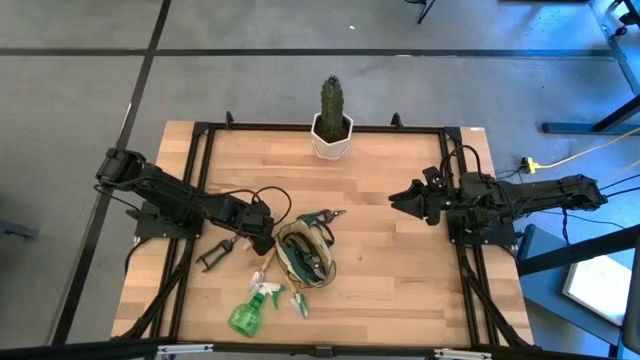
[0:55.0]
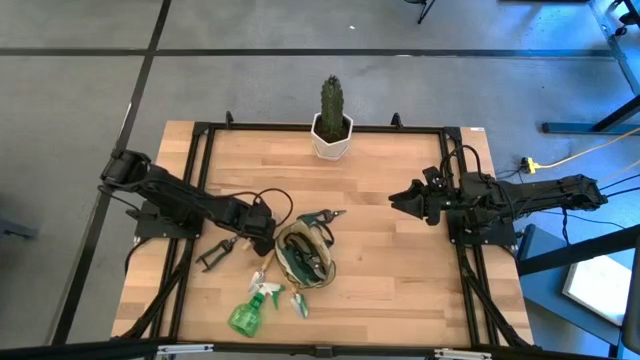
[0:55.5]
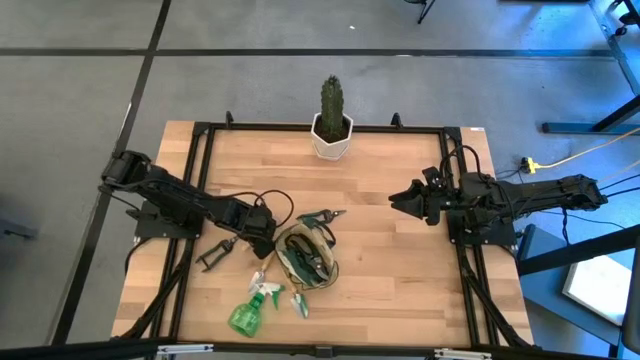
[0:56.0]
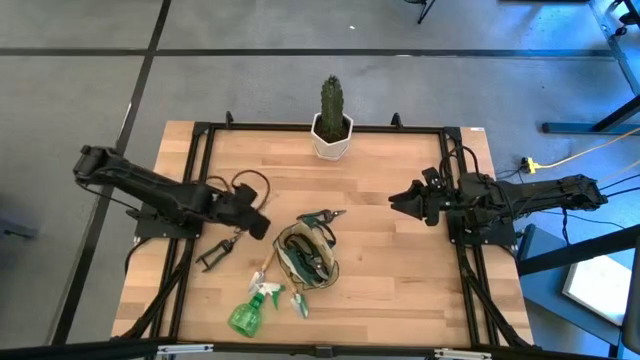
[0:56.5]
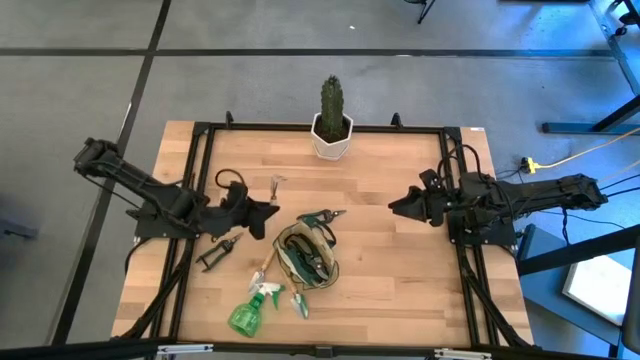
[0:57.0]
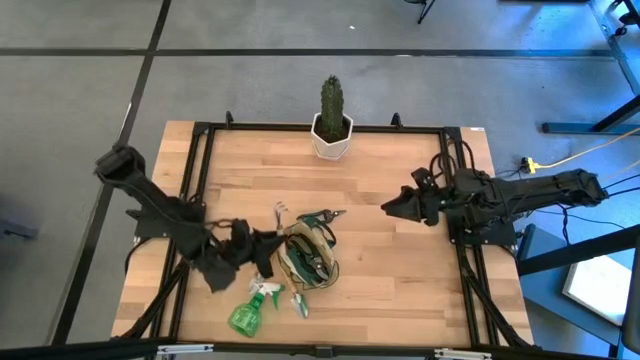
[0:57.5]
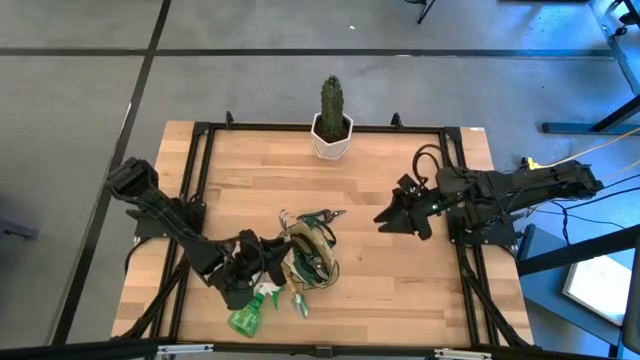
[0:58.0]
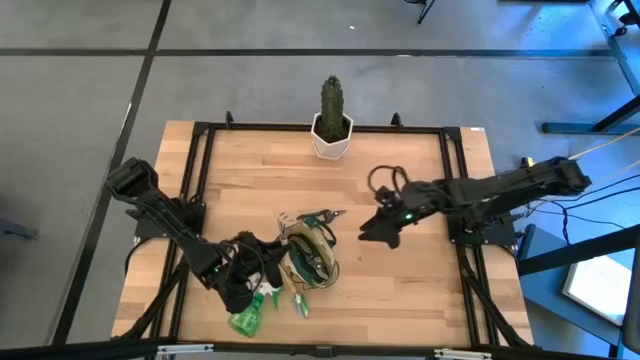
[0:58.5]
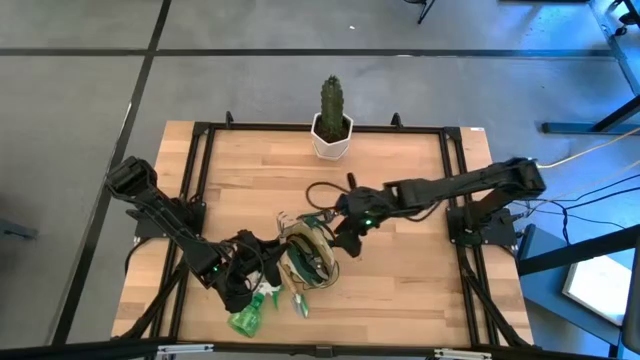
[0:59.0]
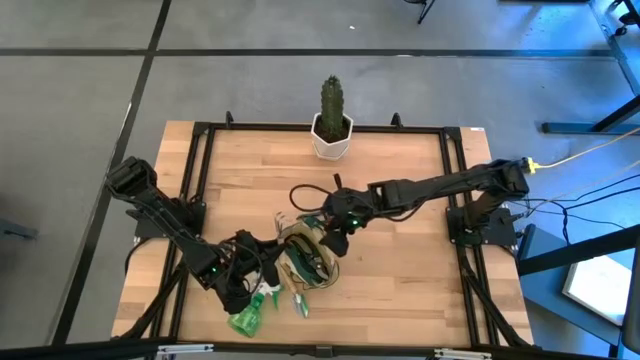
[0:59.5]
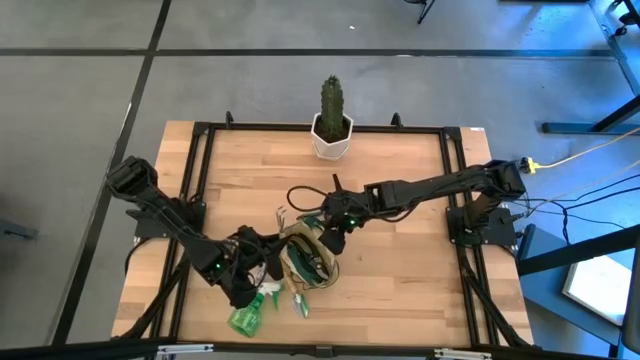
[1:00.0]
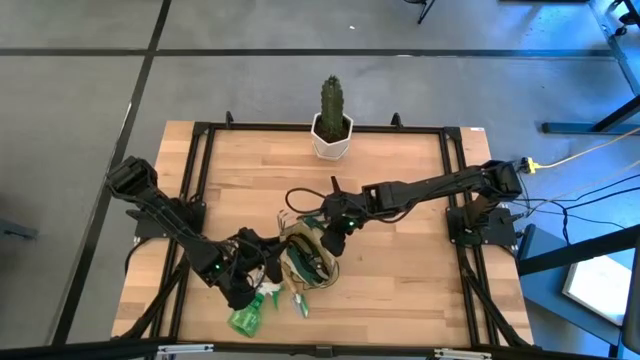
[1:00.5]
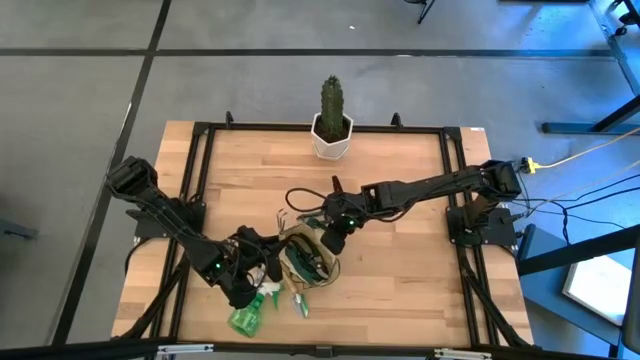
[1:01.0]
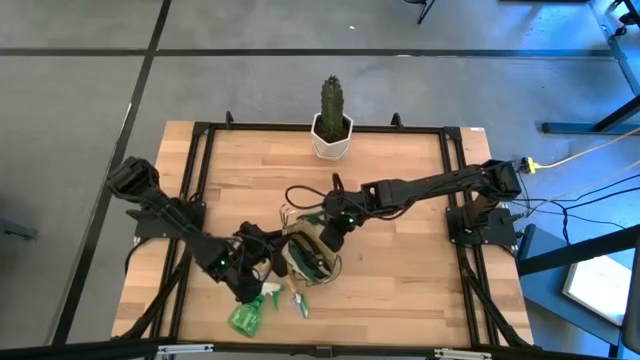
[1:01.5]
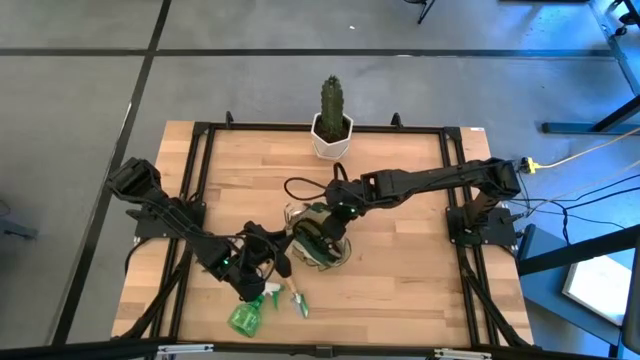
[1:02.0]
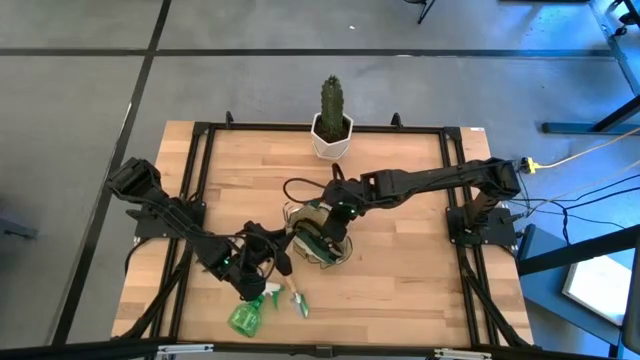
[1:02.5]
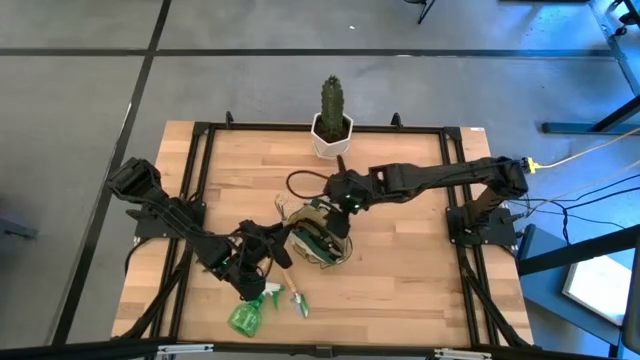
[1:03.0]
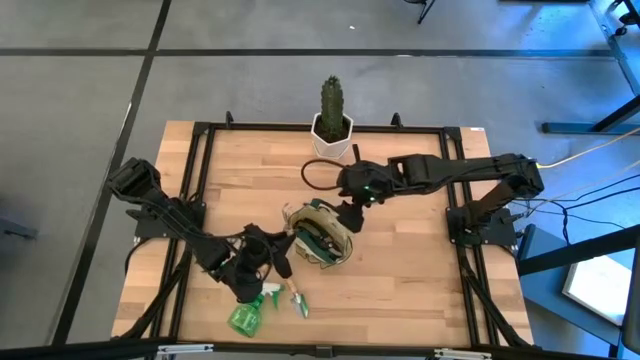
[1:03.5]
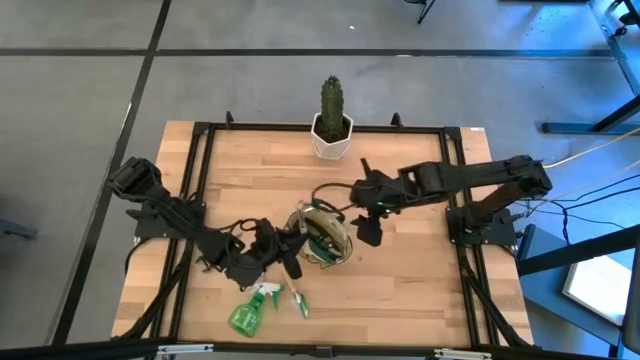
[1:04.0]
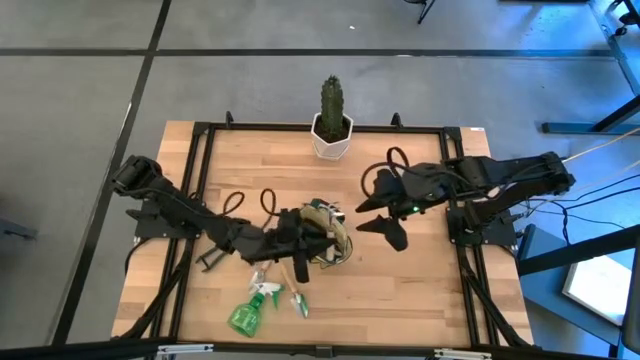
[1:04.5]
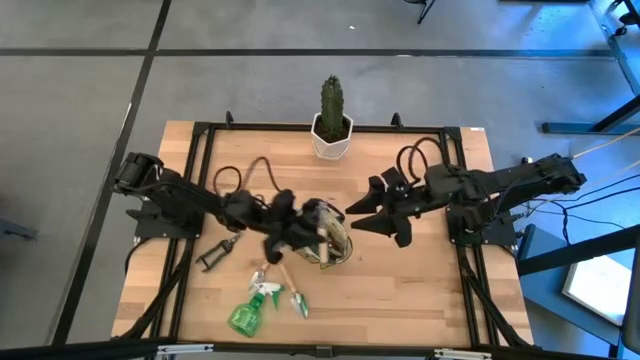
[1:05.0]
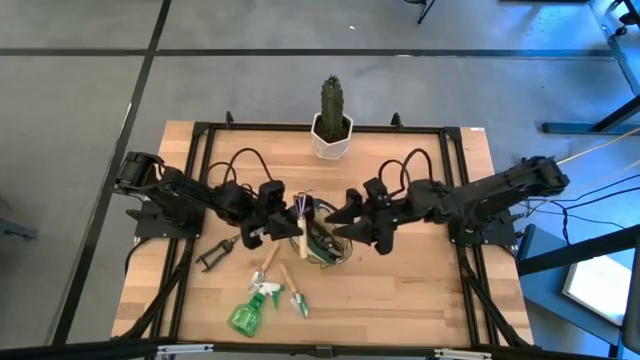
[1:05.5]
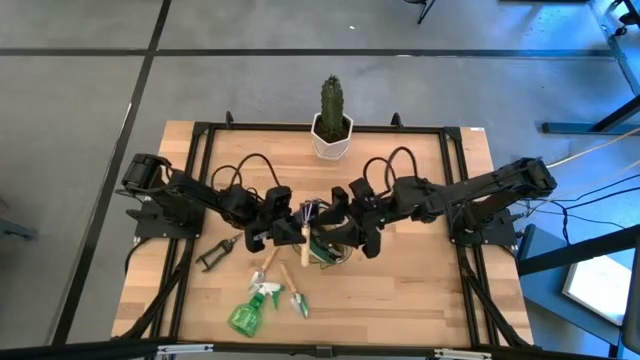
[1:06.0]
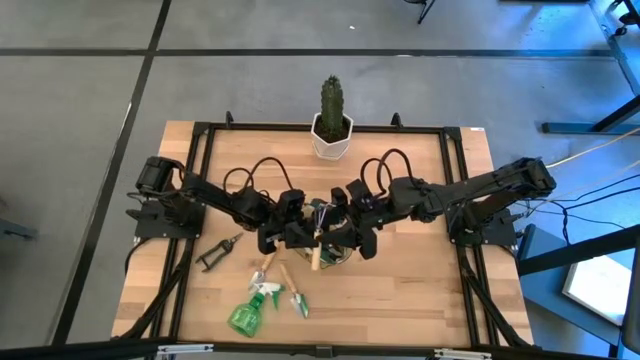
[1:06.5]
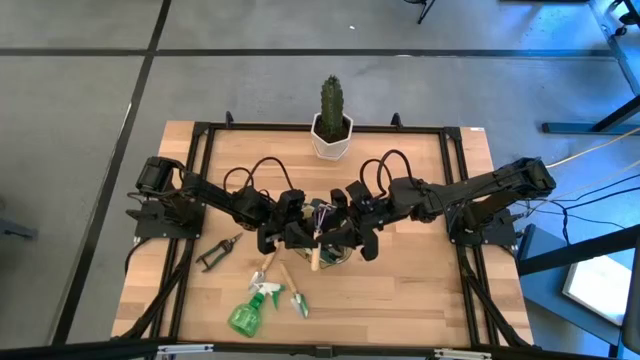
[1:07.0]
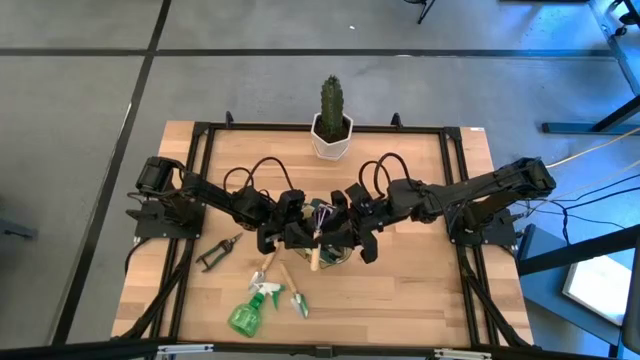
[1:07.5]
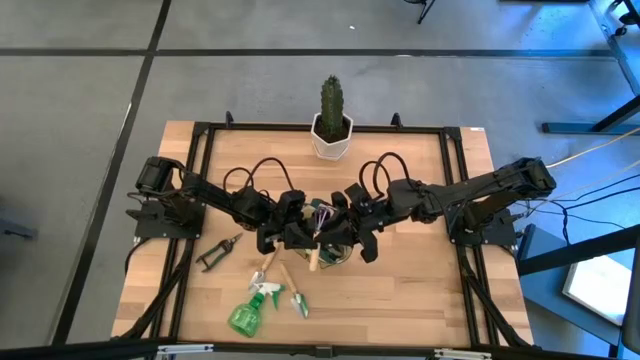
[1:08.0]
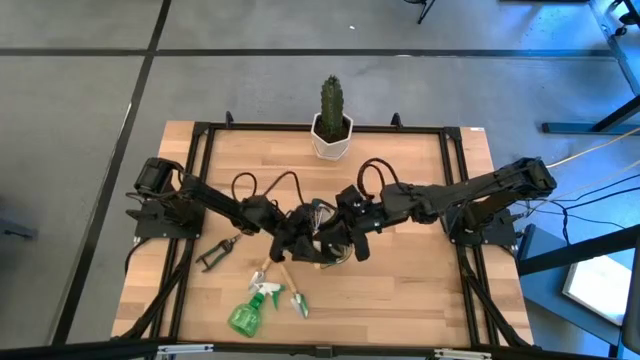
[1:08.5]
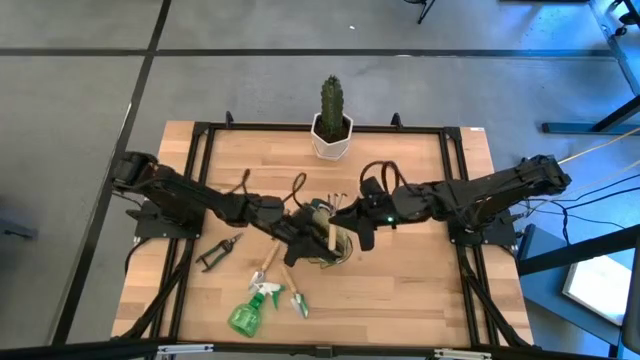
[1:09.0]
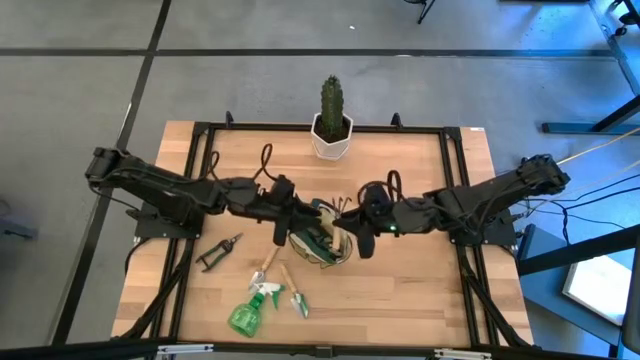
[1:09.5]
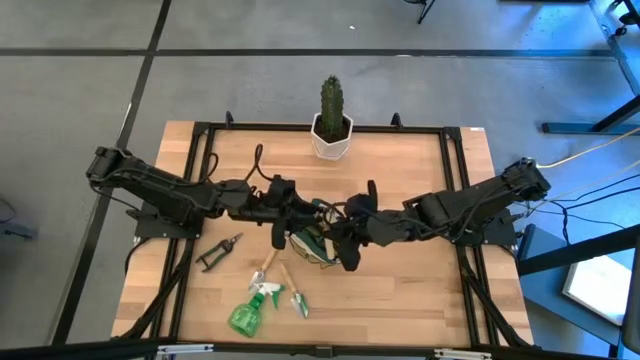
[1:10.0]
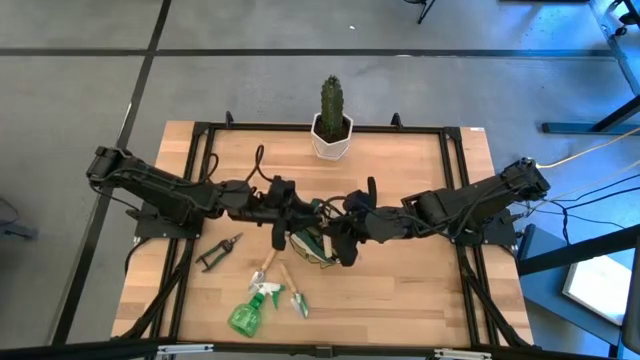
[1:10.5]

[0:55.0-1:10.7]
Task: Pick & Place Garden tools in Gardening bag
Put the brown hand rake into the green gardening bag

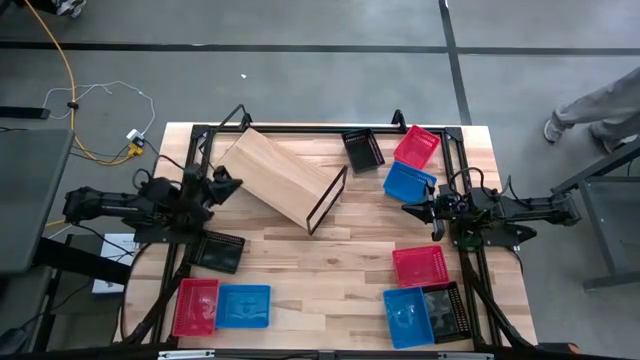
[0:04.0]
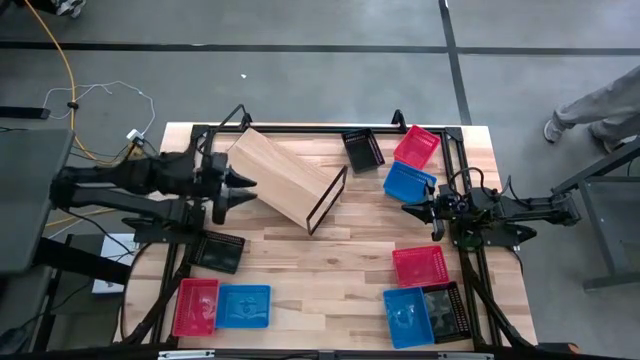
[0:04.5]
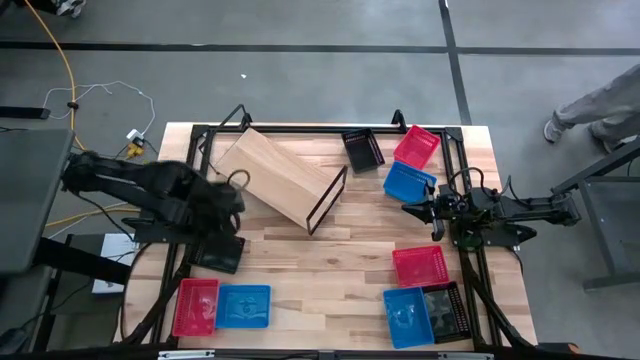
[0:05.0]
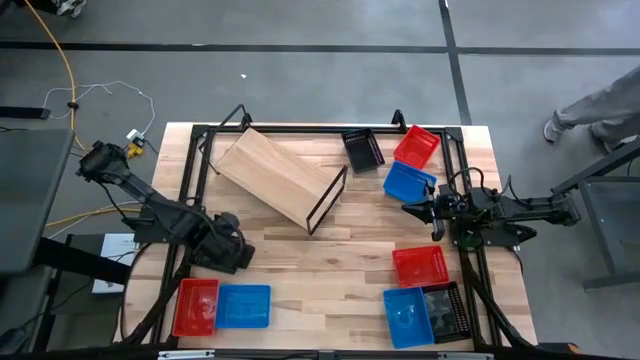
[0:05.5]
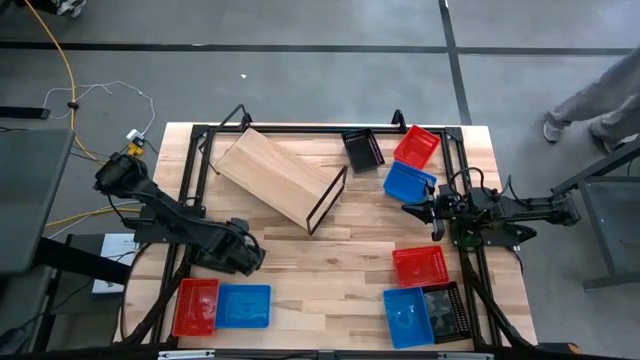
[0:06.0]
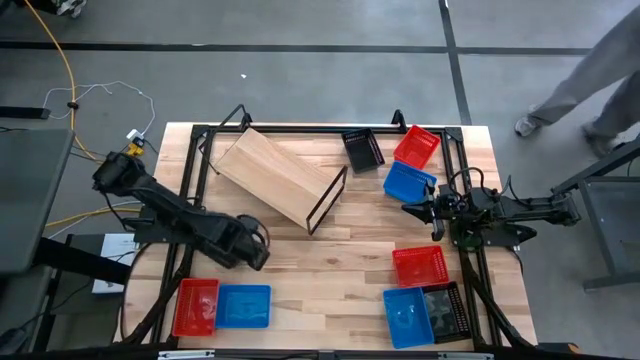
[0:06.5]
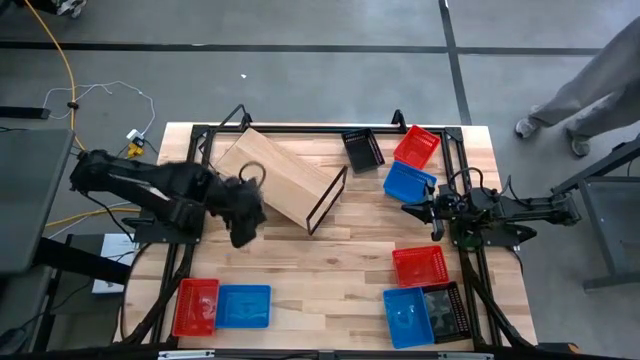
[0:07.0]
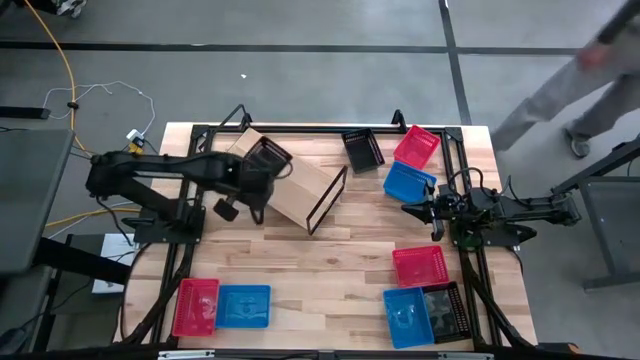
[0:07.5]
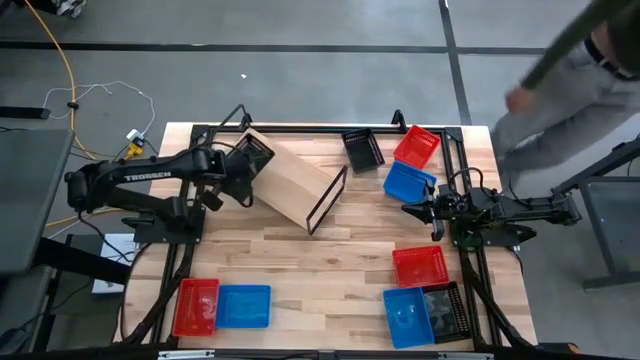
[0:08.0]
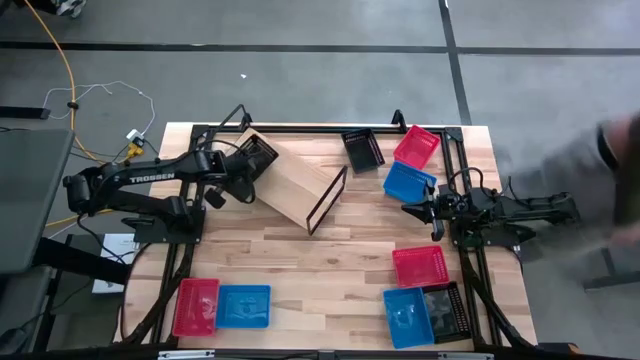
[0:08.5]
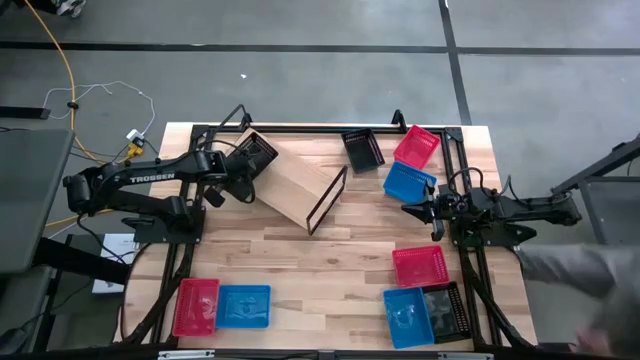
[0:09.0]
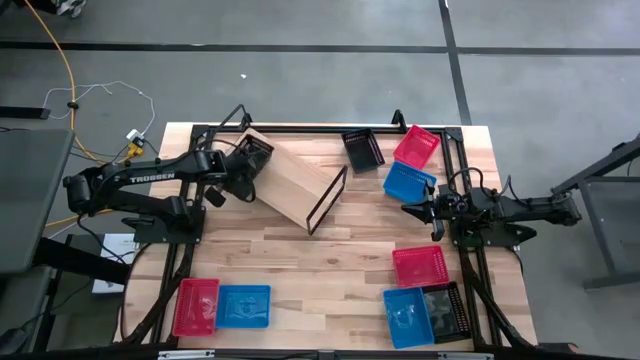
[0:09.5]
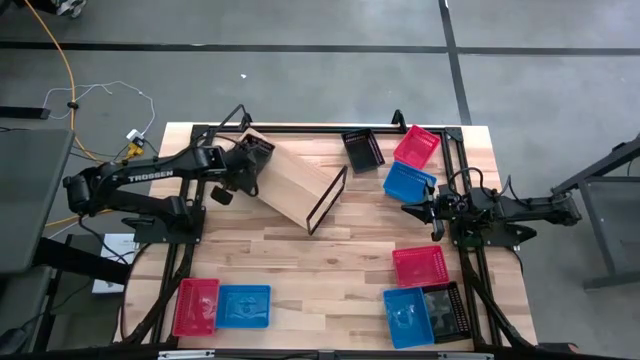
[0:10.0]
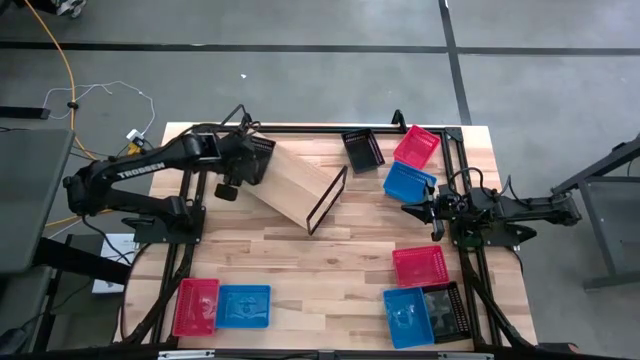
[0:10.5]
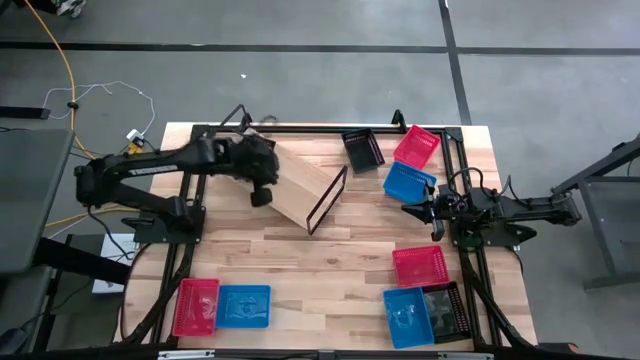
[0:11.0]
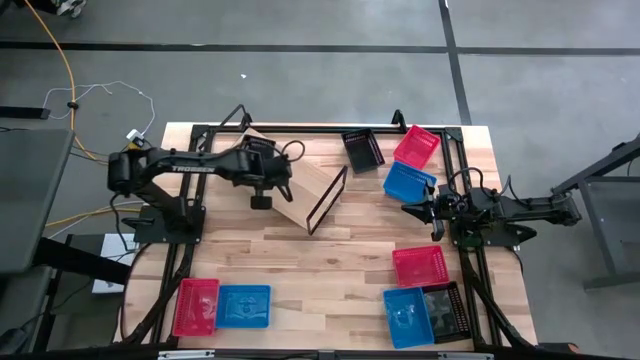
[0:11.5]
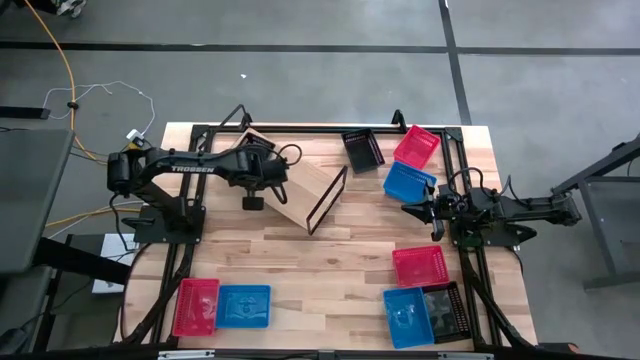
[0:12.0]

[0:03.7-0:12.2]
Task: Stack baskets on shelf by color
Put the bottom left black bin on the shelf
